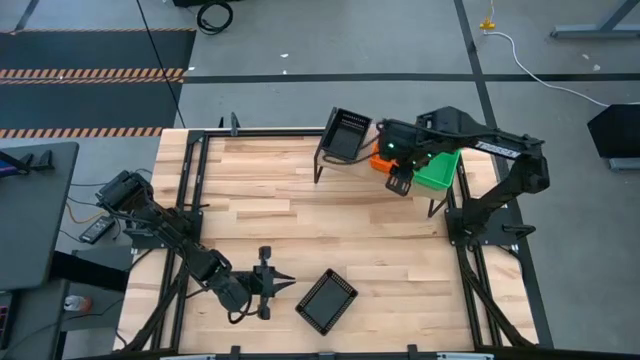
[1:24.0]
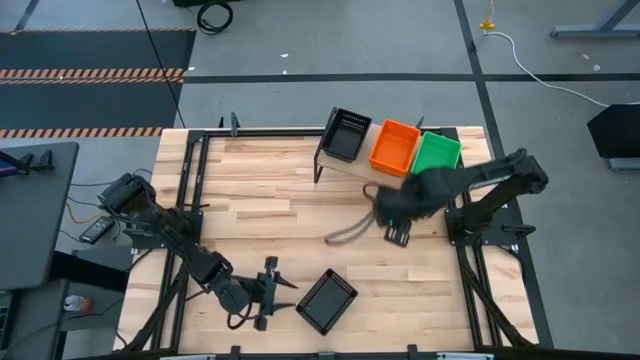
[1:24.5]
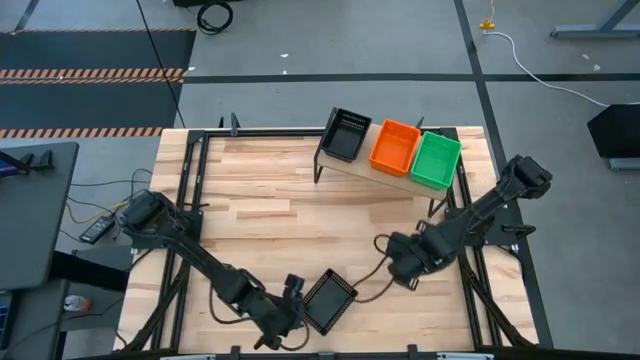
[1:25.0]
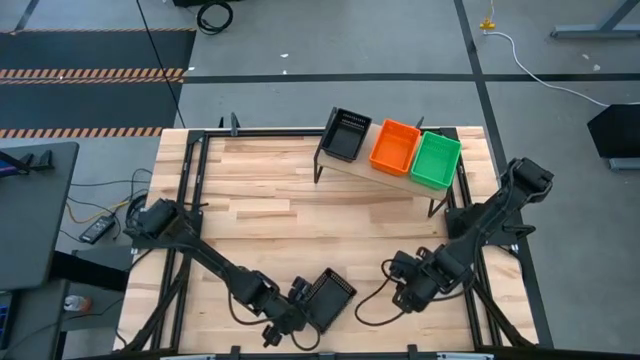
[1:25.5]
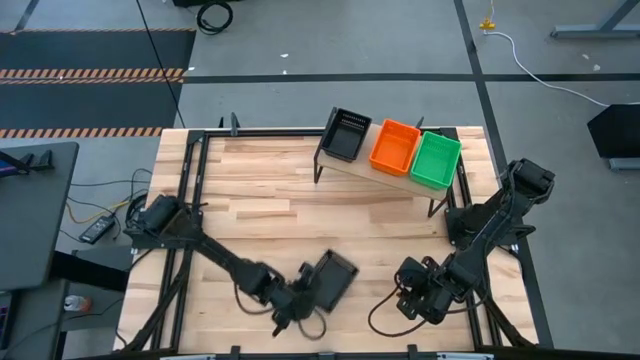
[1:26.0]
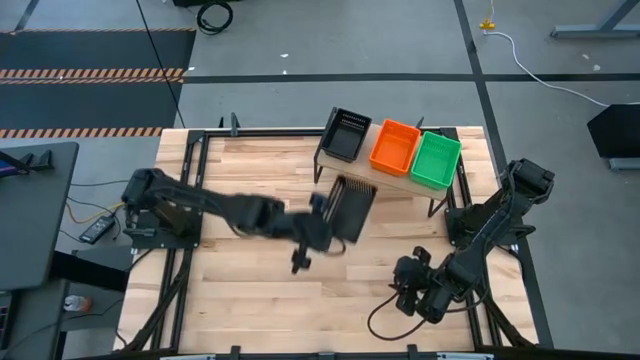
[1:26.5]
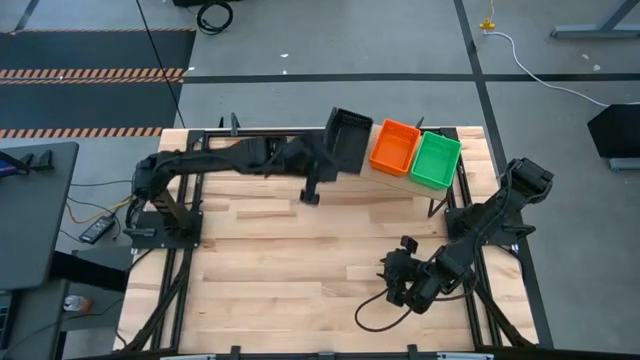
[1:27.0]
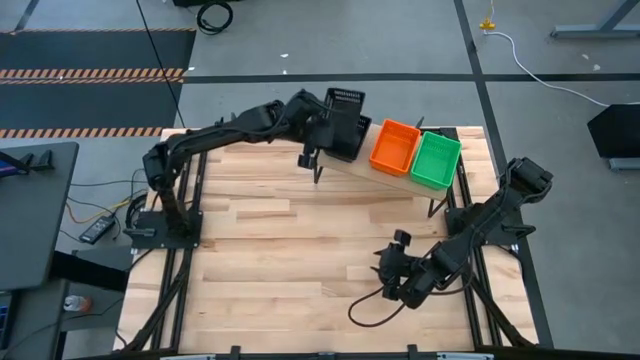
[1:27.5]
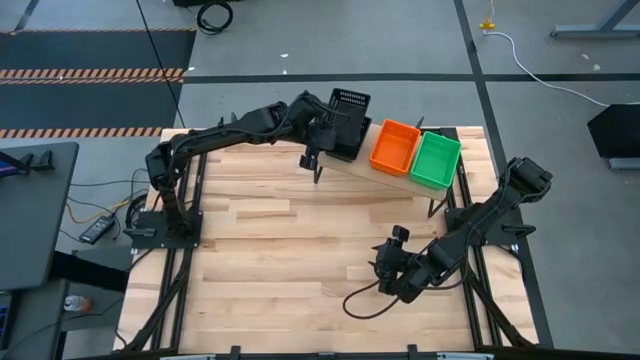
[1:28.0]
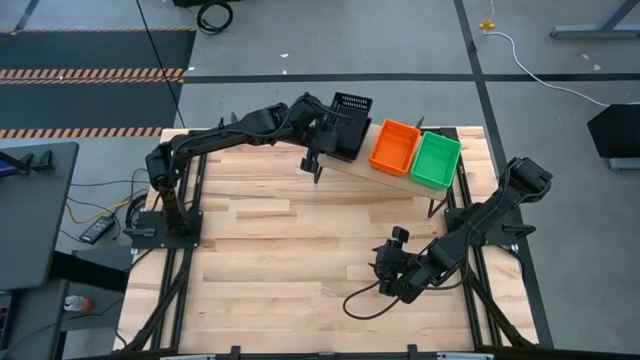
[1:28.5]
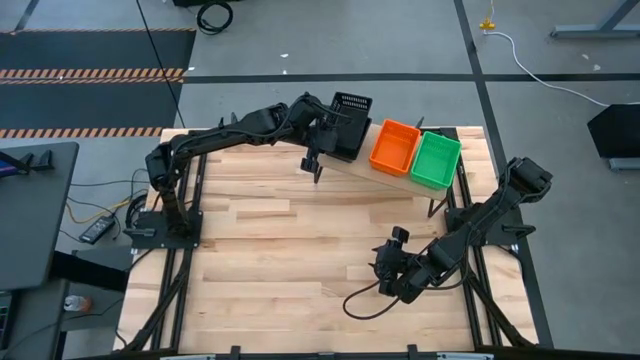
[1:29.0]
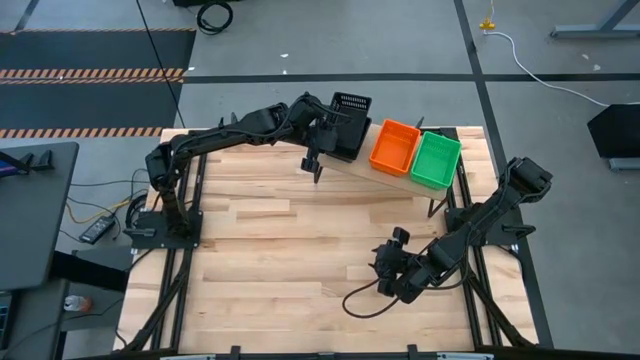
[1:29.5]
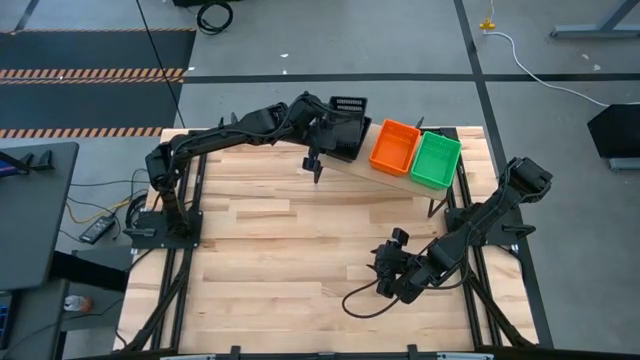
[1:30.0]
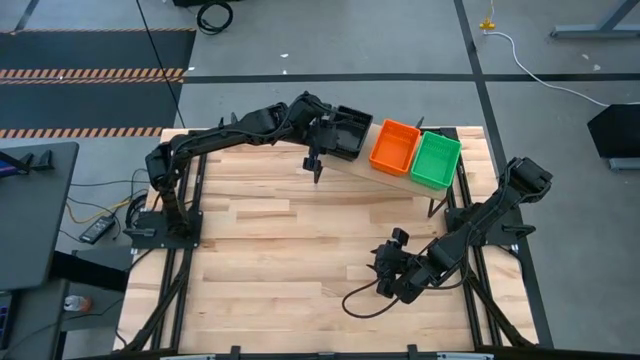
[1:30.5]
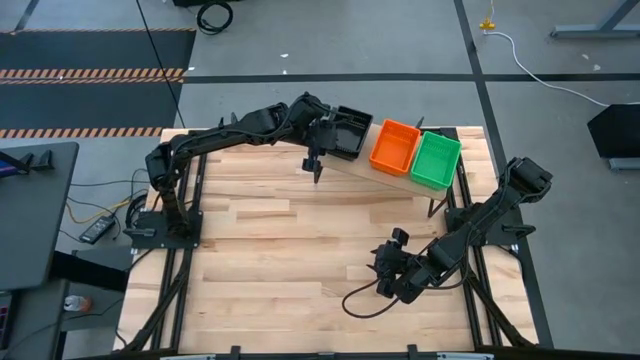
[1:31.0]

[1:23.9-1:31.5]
Task: Stack baskets on shelf by color
Stack the black bin on top of the stacked black bins on the shelf

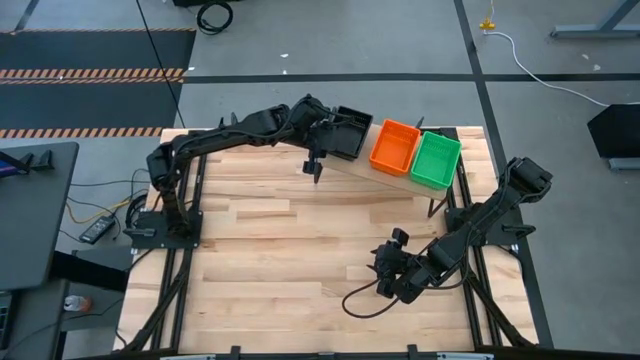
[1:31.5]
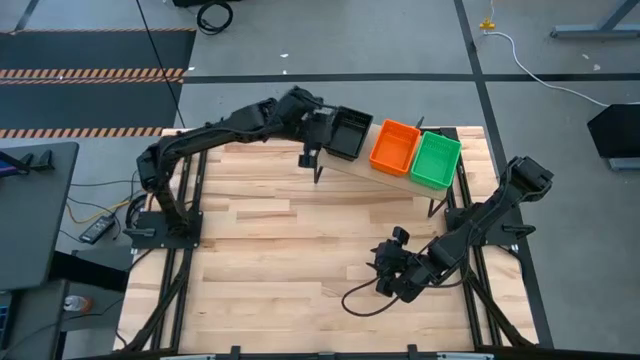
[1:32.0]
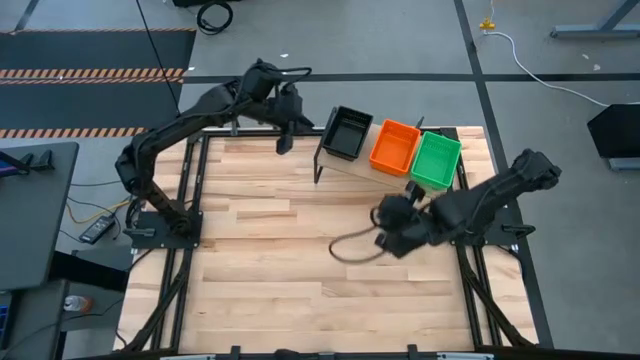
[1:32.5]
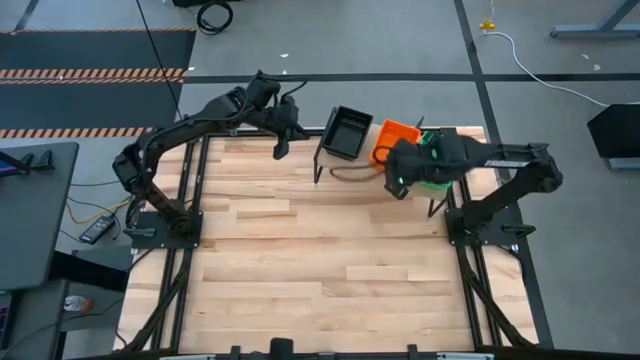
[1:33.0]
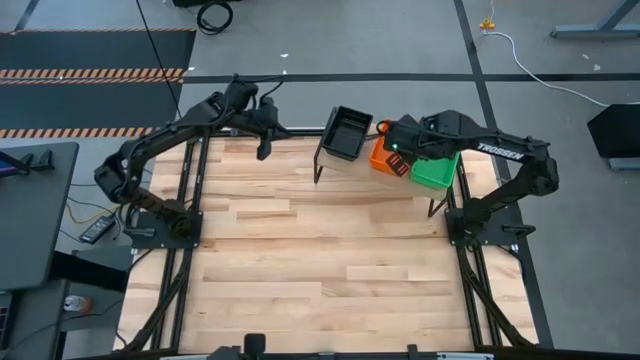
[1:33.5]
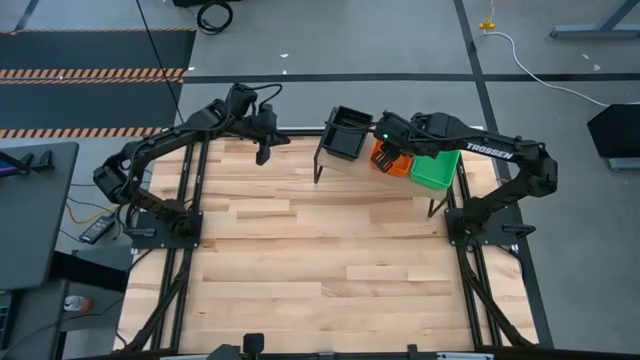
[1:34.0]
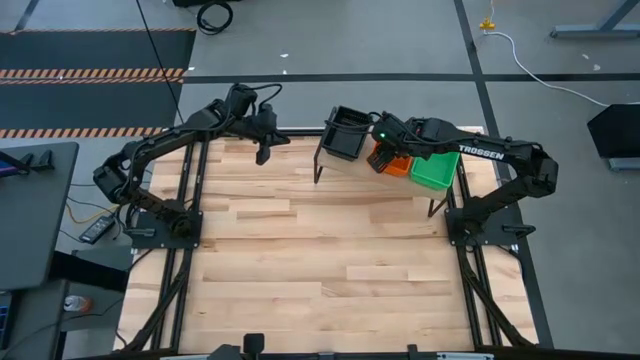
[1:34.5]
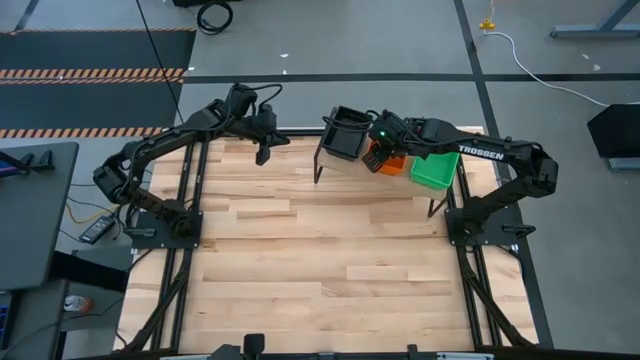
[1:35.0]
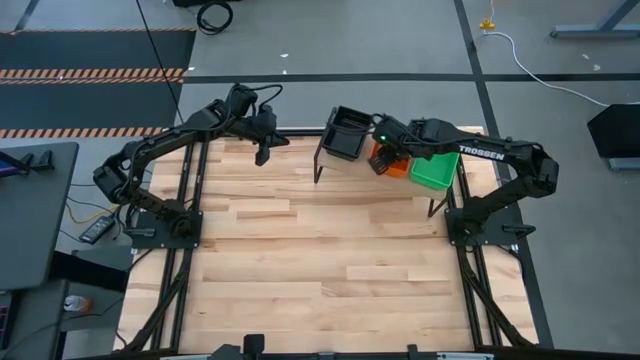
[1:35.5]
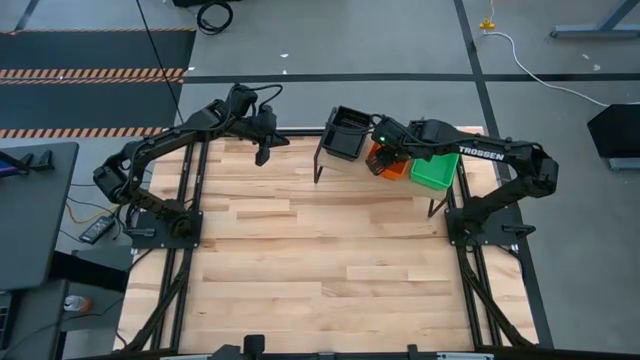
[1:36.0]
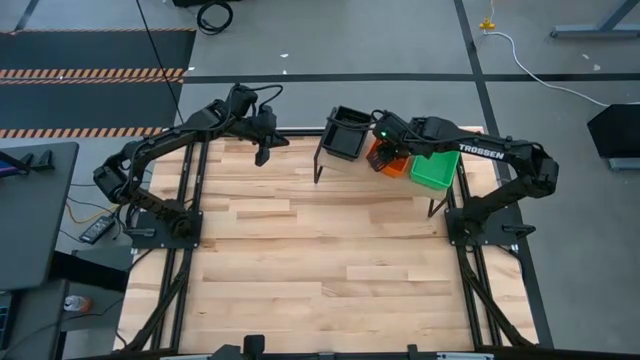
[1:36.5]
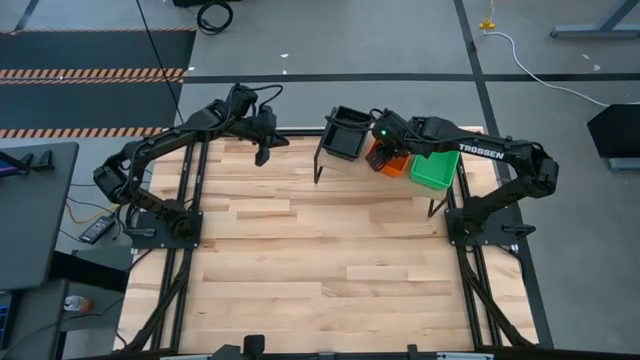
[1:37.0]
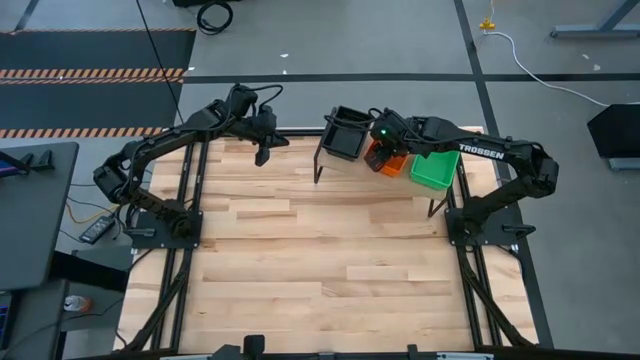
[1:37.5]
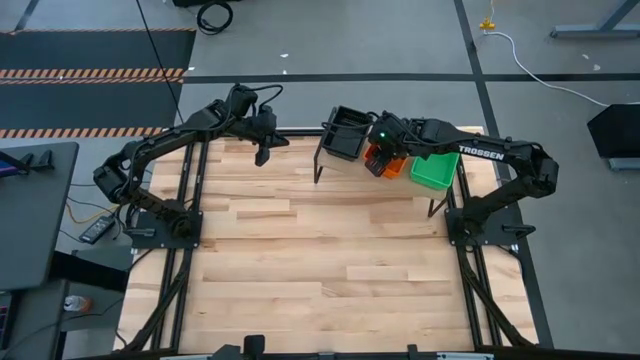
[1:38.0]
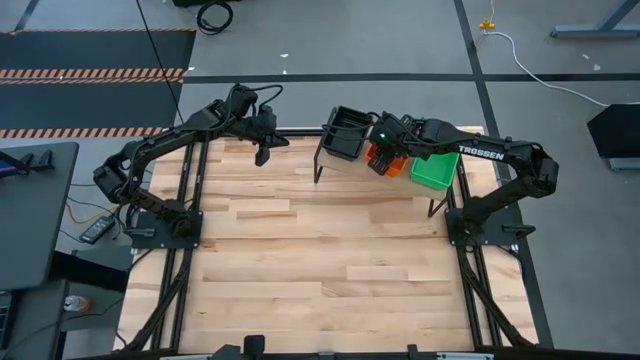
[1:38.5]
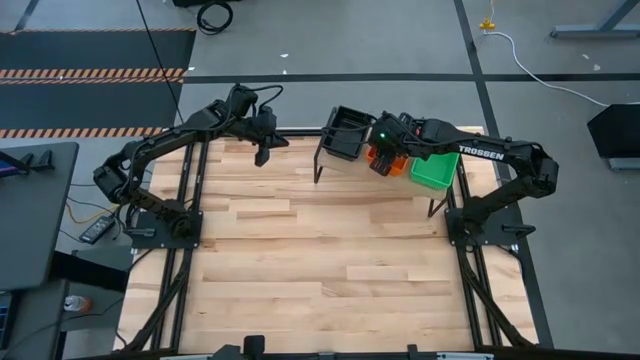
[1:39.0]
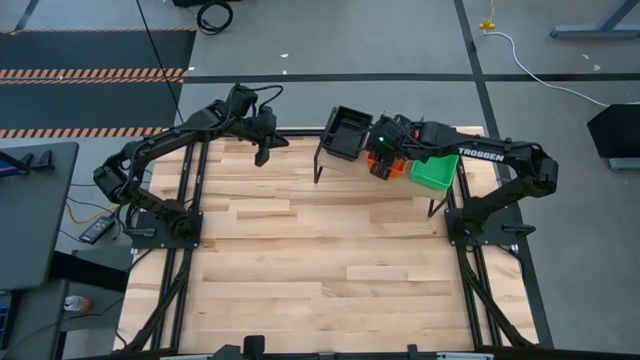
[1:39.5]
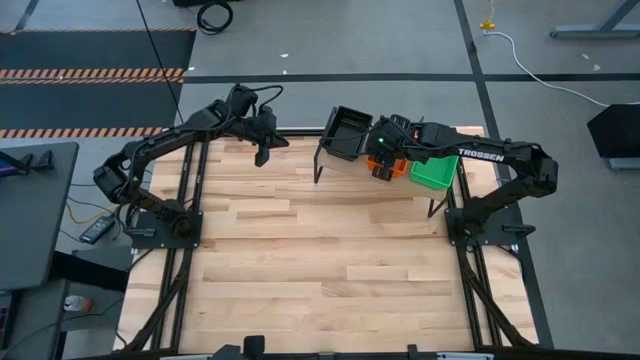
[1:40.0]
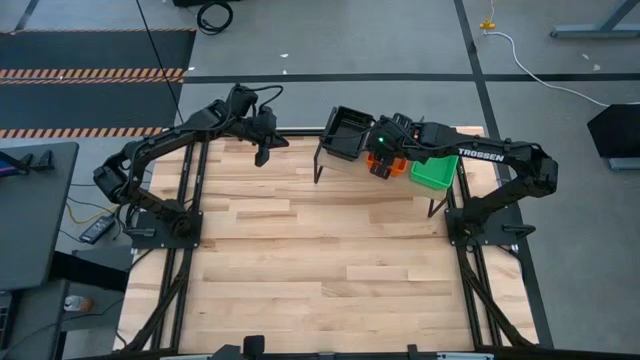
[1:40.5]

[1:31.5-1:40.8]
Adjust the stacked orange bins on the shelf

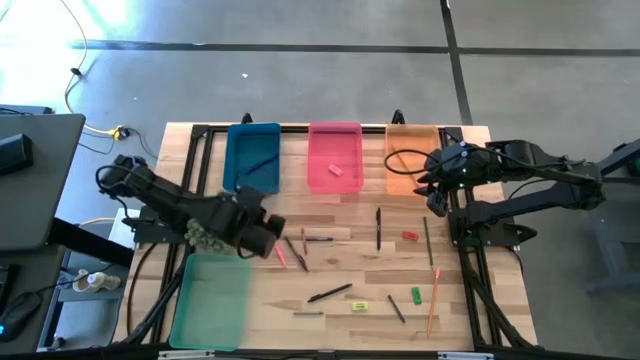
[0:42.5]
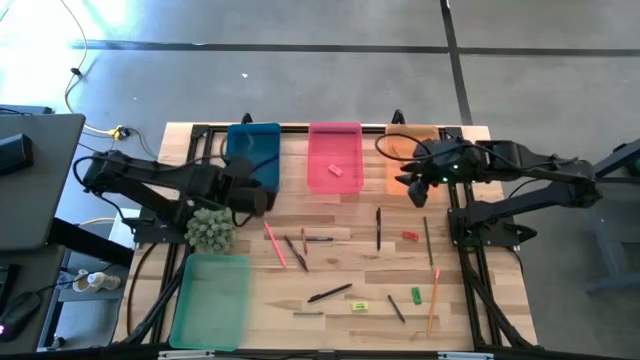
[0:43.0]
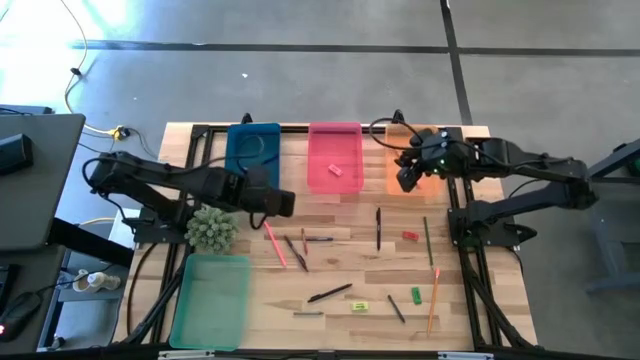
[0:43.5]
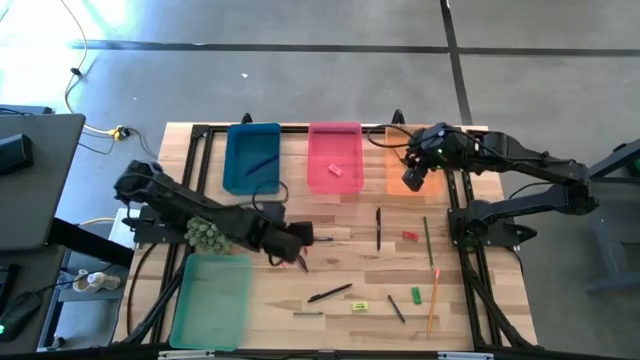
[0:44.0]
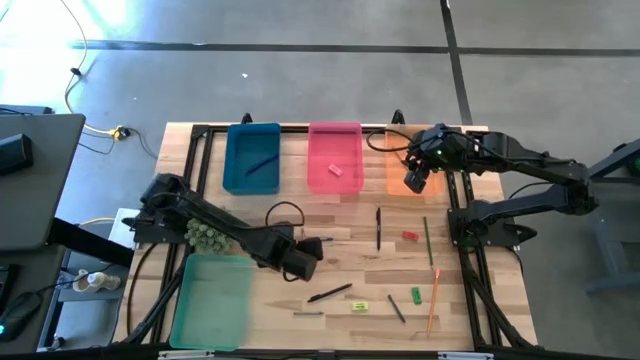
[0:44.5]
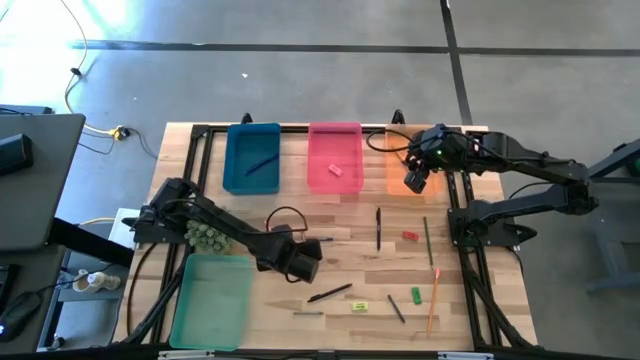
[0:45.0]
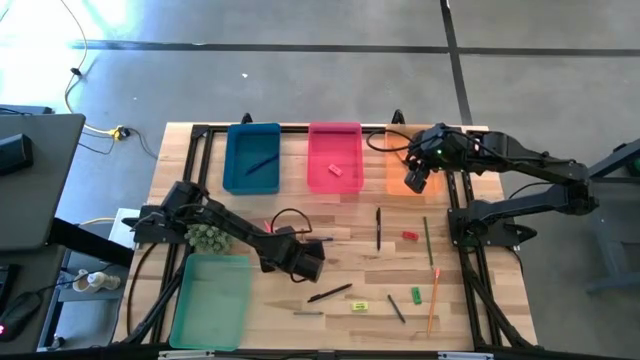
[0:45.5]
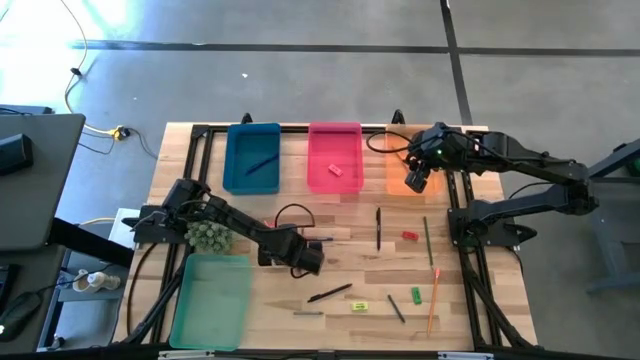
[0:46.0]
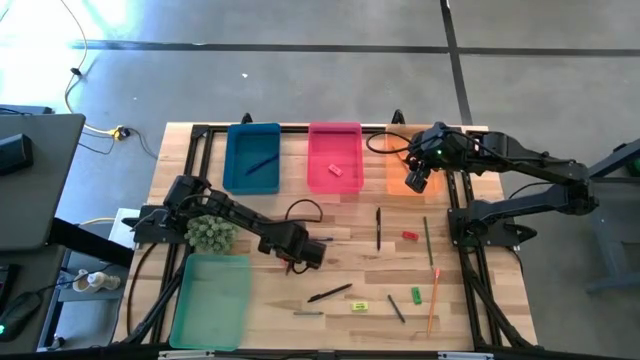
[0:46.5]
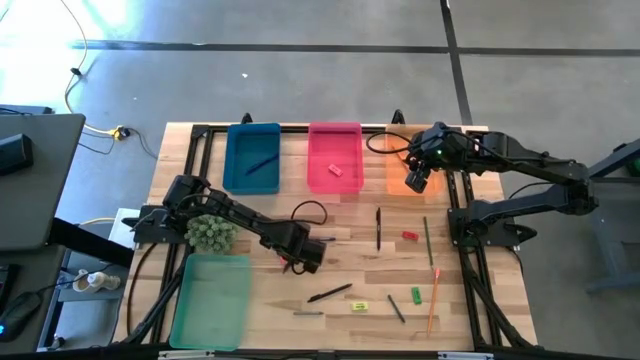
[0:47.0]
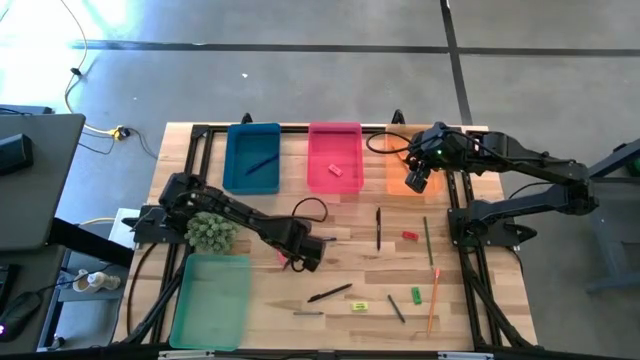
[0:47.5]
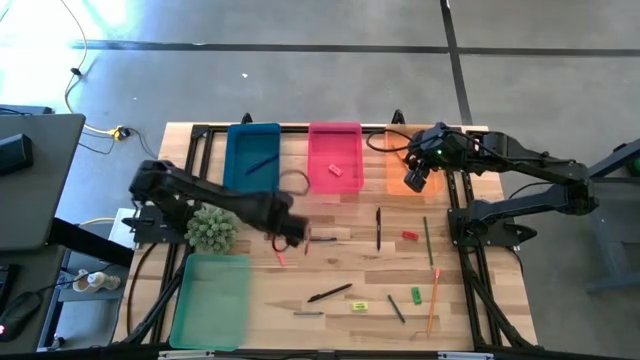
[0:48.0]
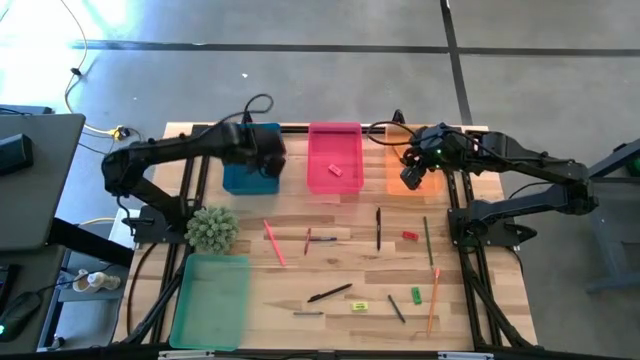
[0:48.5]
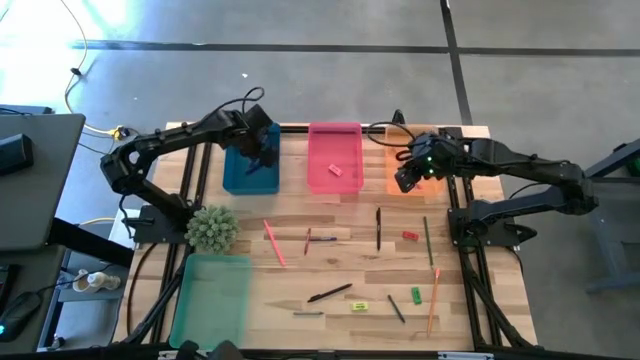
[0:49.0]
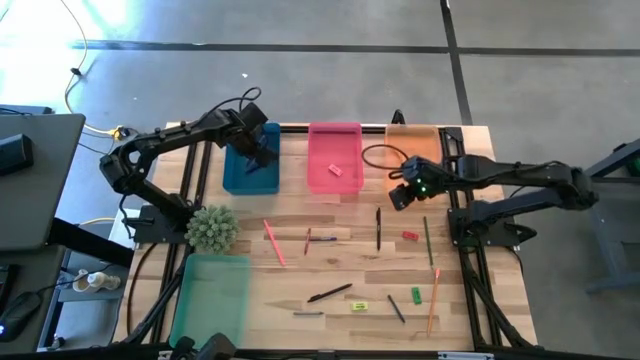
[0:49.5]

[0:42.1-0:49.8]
Task: Sort crayons/erasers/pens/pencils in bins
Put the violet pen into the blue bin
